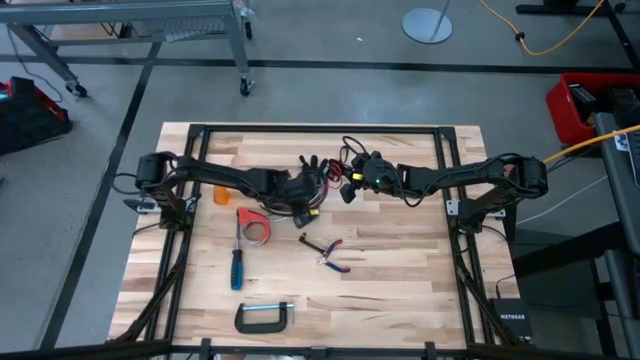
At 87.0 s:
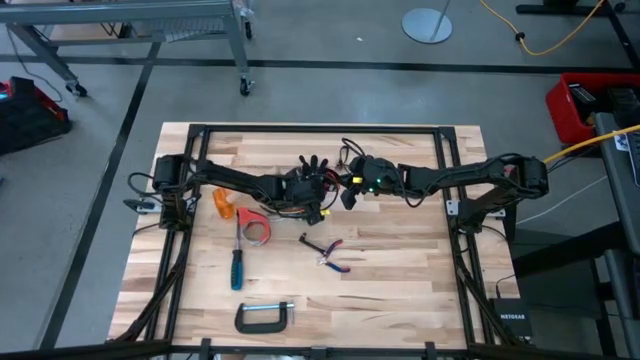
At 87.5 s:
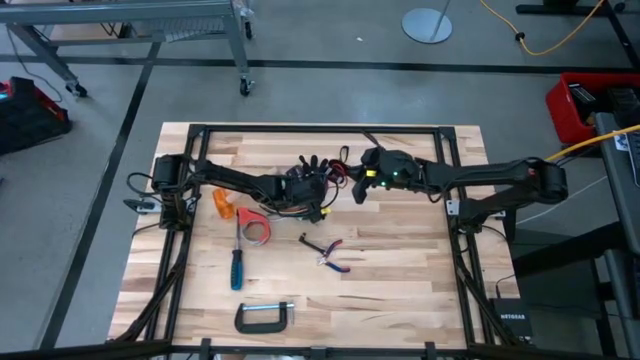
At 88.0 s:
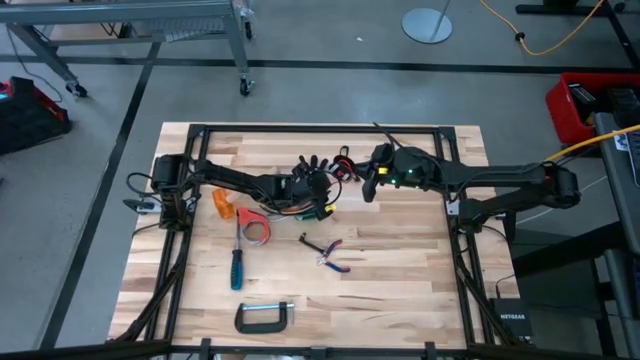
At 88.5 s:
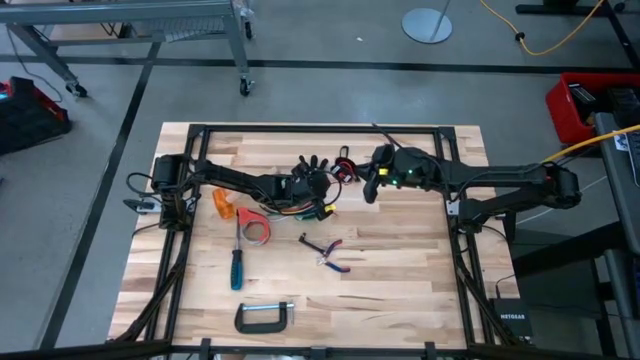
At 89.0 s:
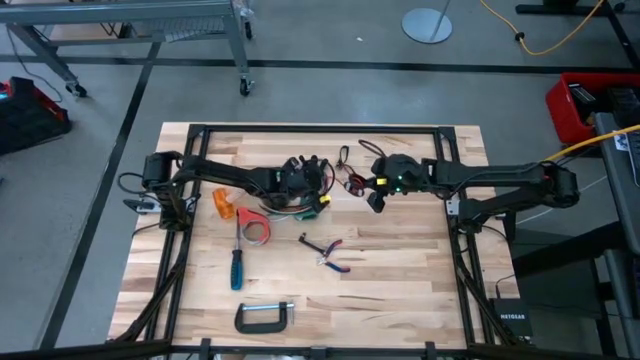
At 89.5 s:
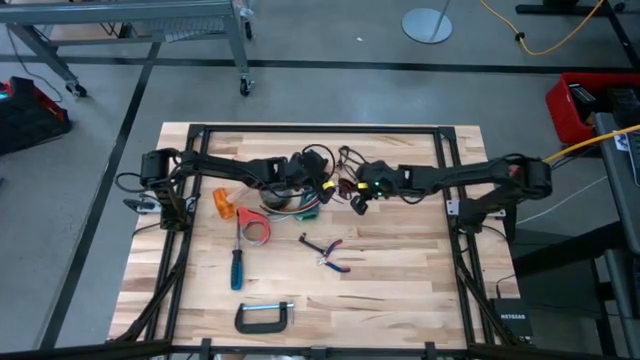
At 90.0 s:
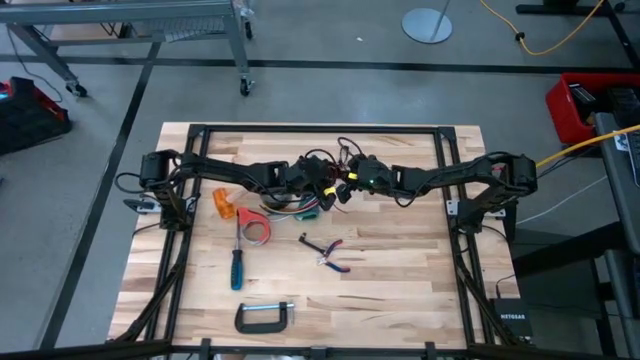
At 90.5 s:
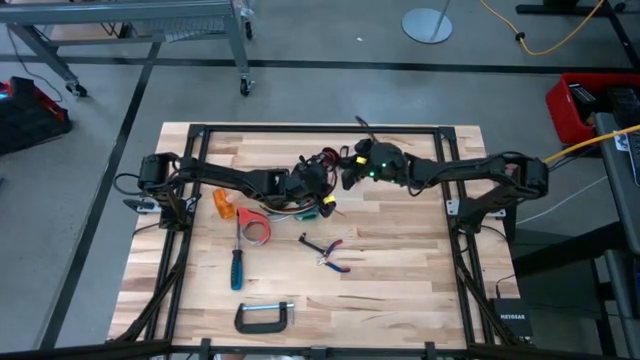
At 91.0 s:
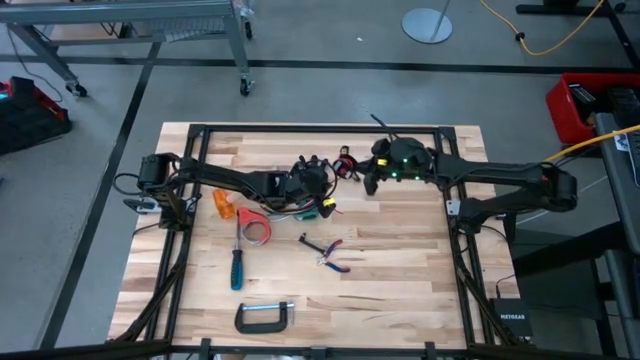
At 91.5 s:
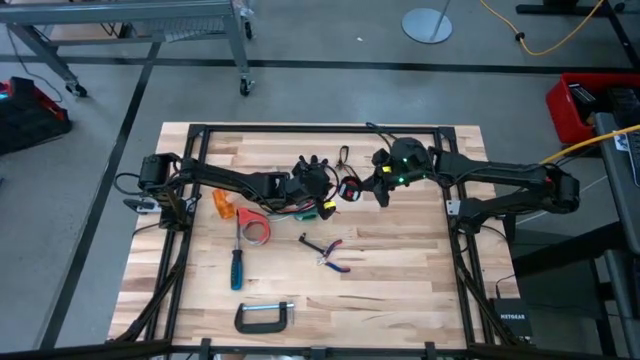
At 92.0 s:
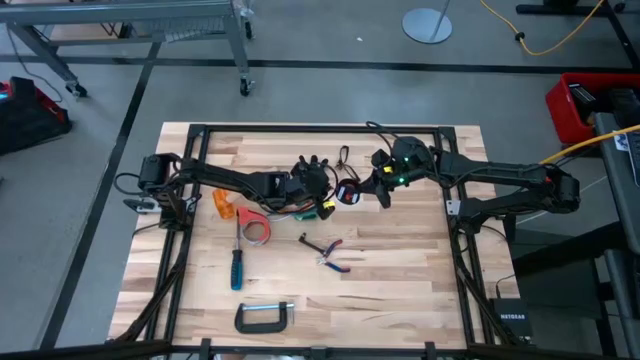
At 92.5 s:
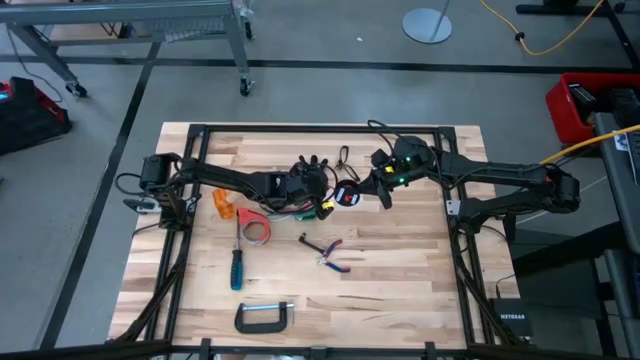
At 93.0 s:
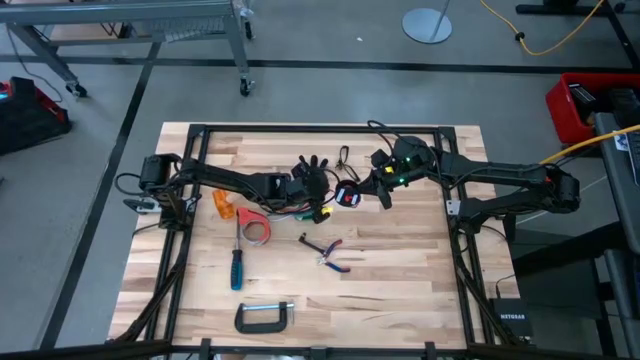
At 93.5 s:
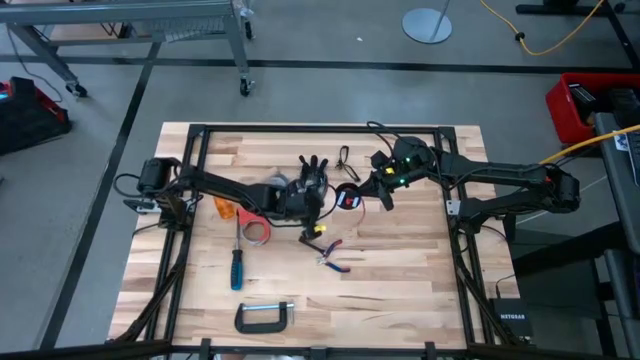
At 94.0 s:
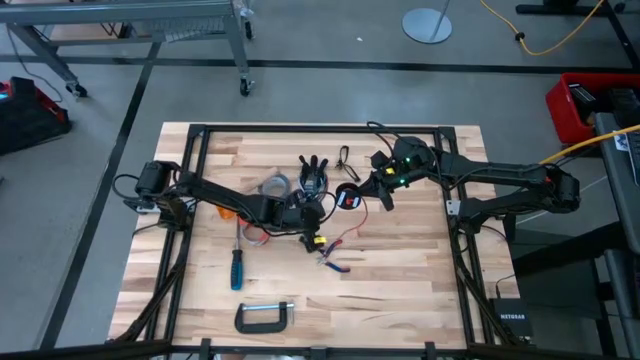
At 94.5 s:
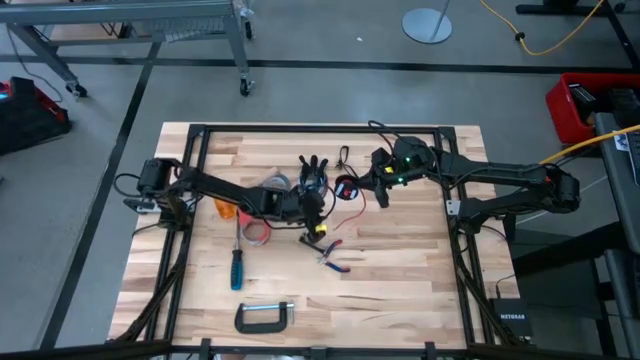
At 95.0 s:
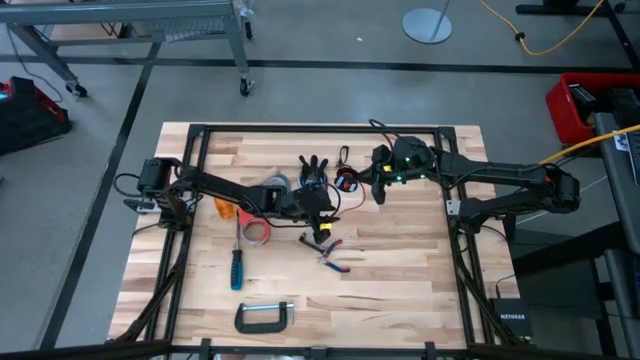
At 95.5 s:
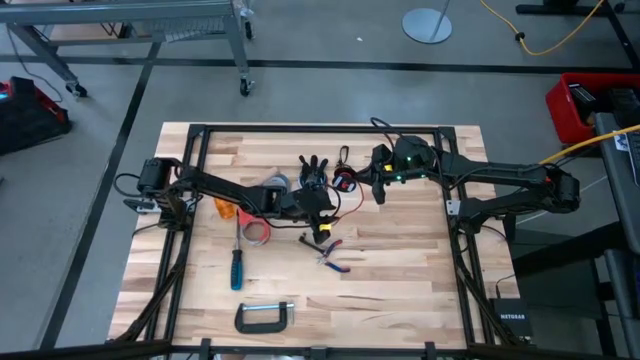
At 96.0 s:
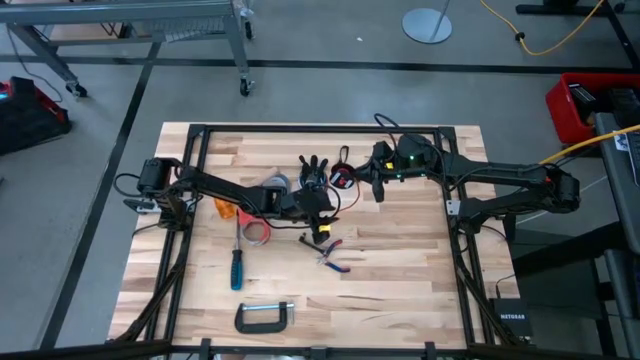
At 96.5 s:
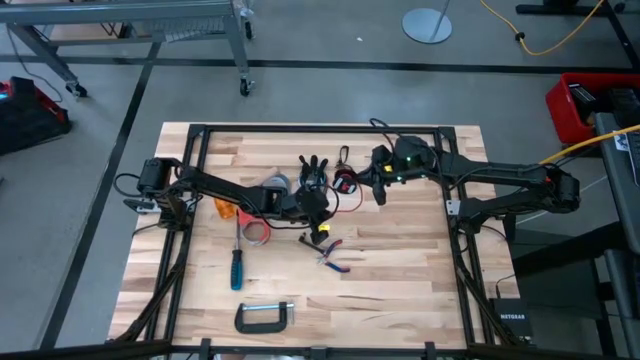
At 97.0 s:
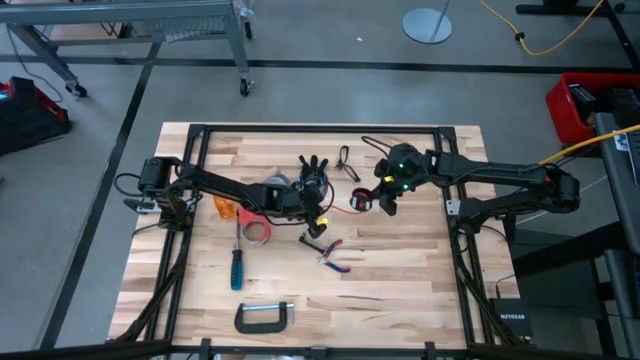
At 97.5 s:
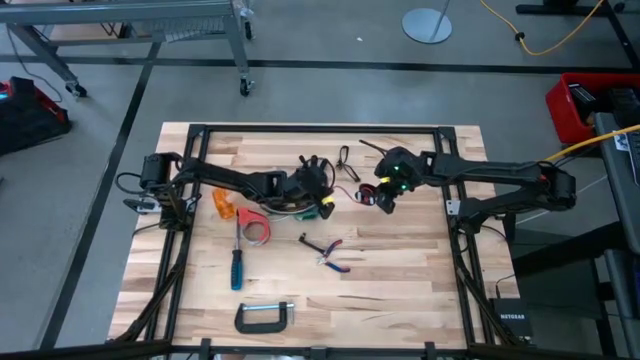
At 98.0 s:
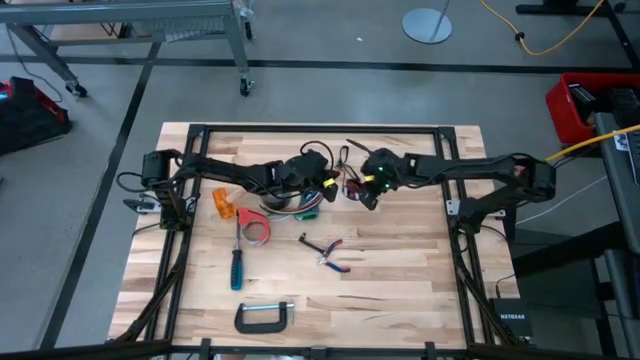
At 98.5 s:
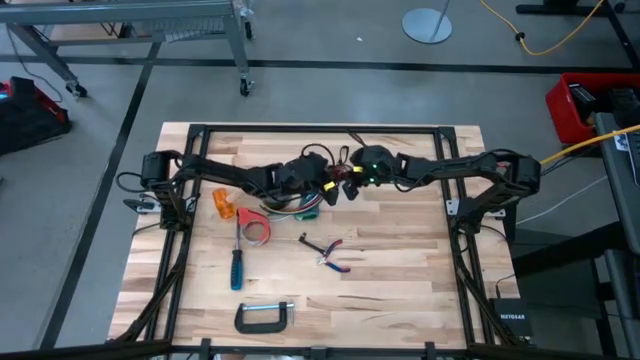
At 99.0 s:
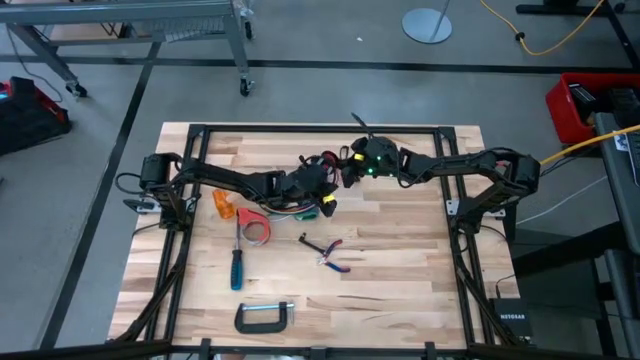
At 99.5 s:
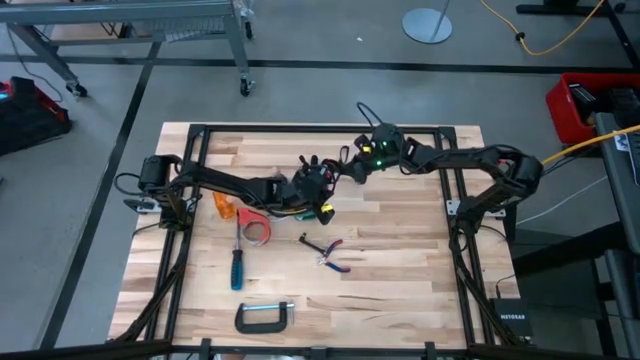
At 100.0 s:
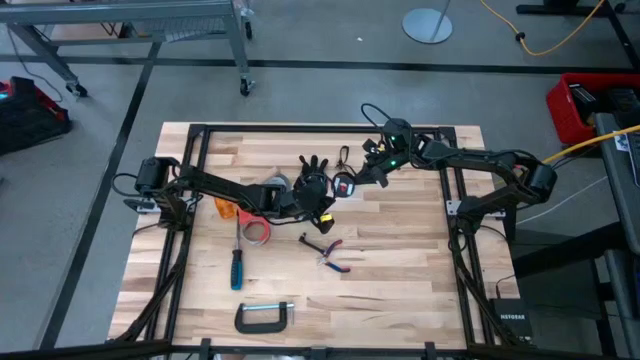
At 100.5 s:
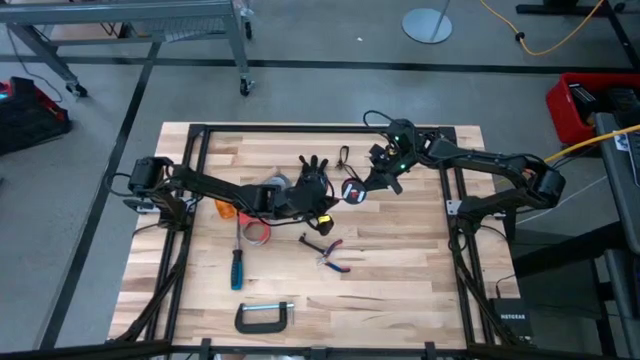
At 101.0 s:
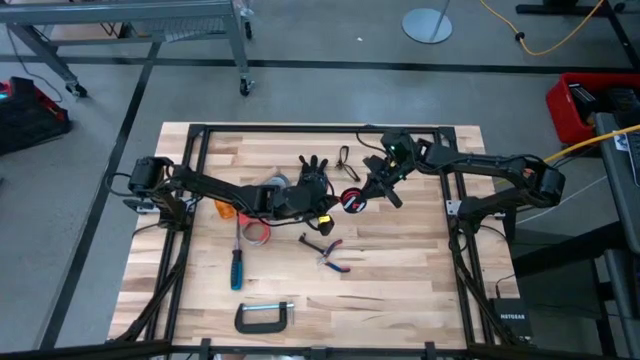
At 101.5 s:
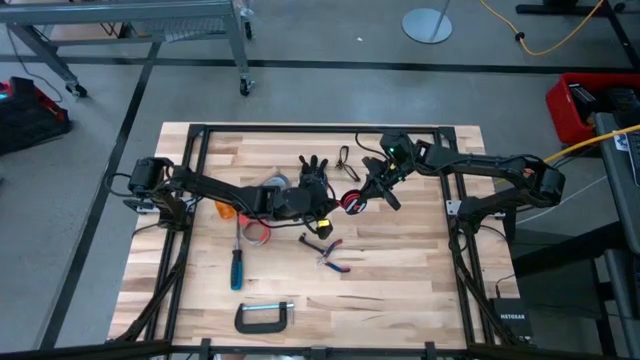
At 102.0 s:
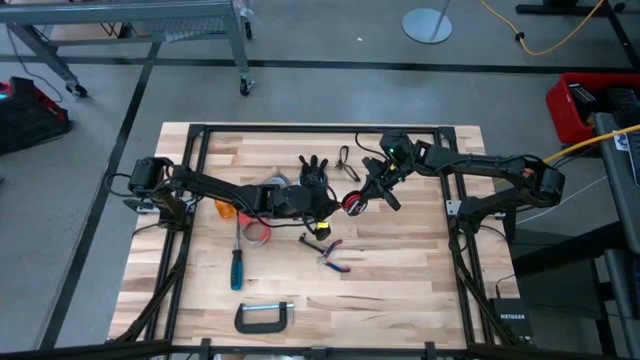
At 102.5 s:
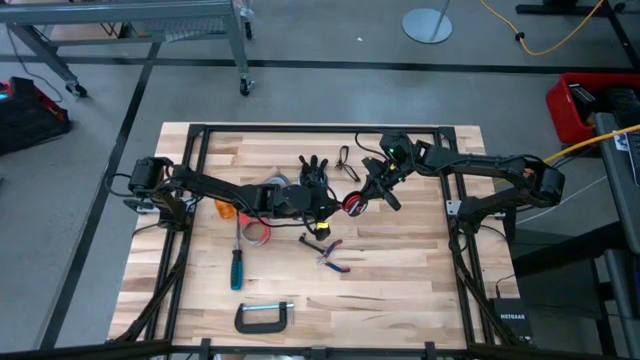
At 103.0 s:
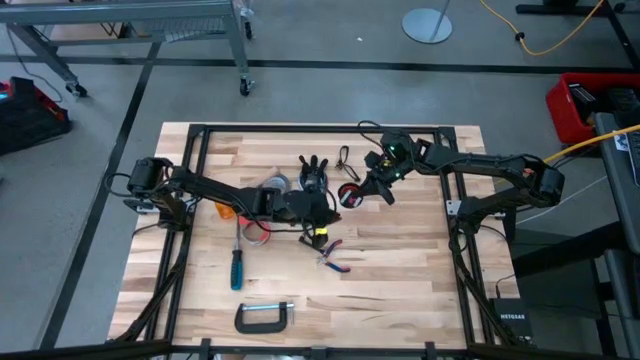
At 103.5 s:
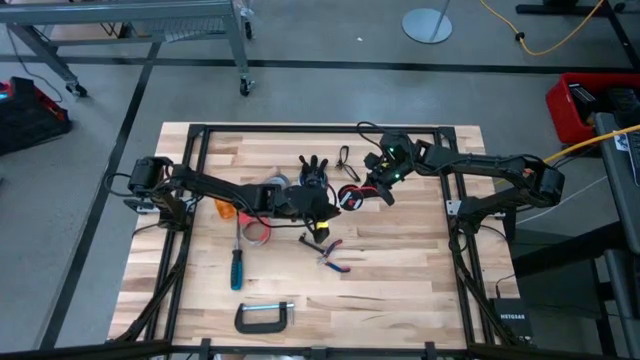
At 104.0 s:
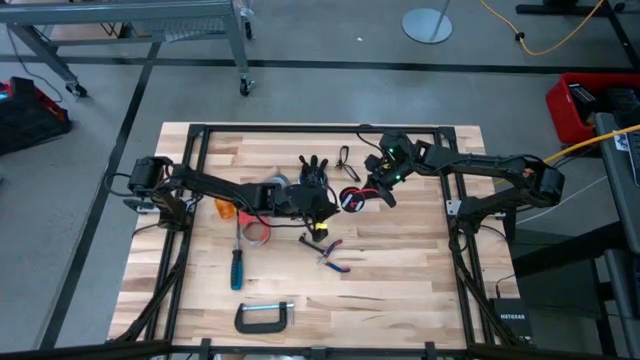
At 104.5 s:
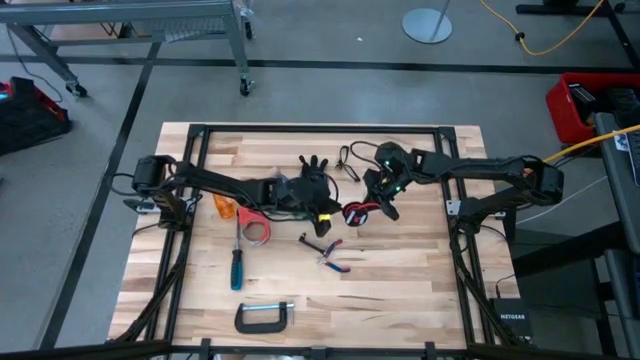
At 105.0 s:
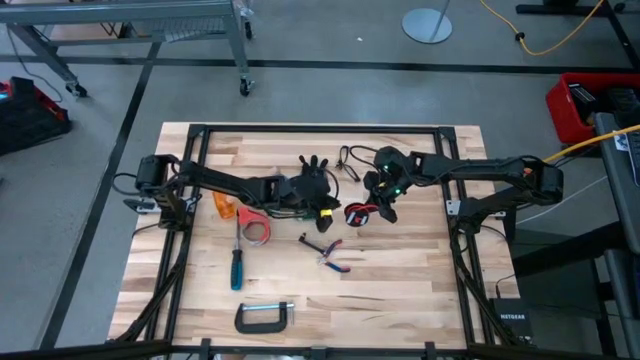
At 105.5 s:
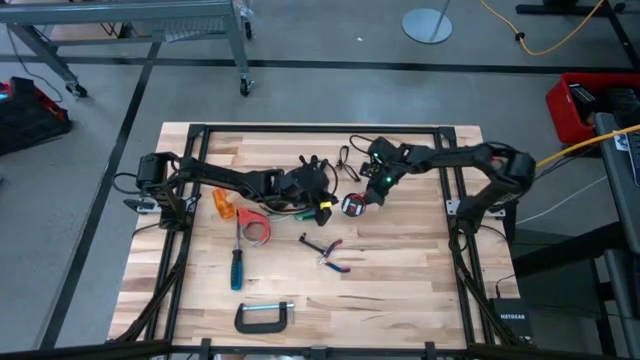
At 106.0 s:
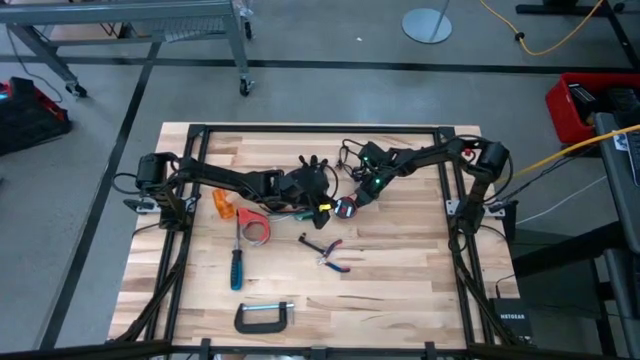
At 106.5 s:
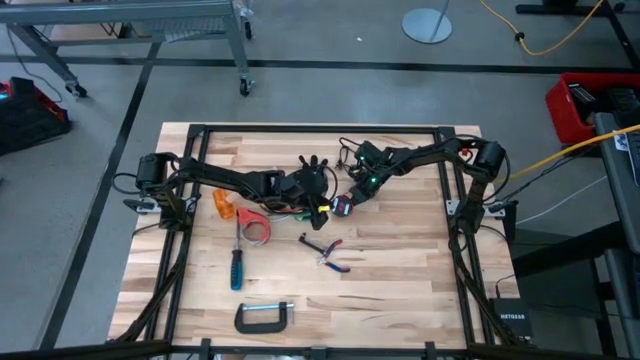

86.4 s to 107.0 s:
Task: Coil cords
Coil the red wire onto the black spool

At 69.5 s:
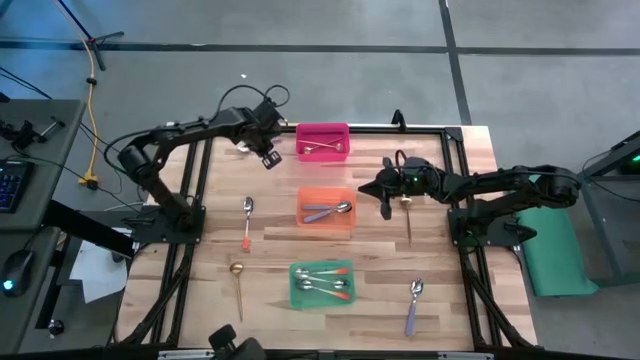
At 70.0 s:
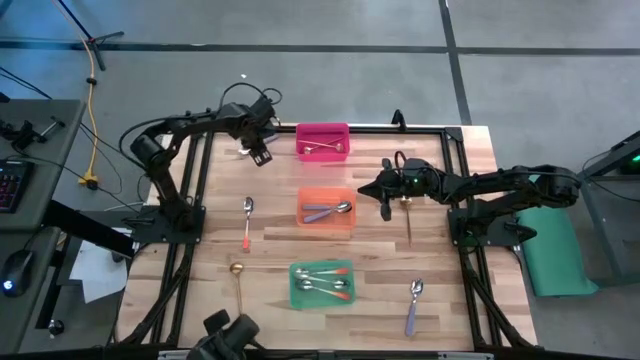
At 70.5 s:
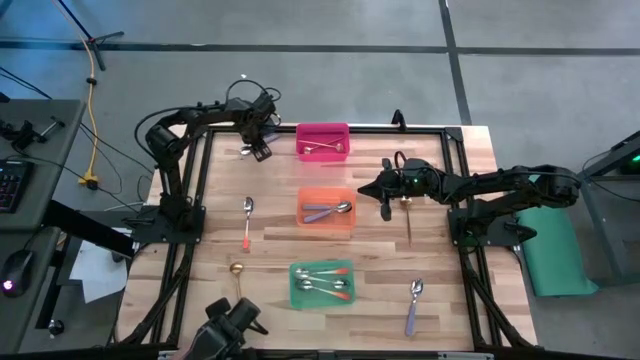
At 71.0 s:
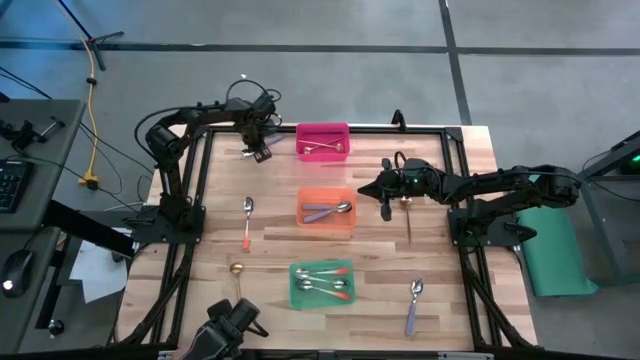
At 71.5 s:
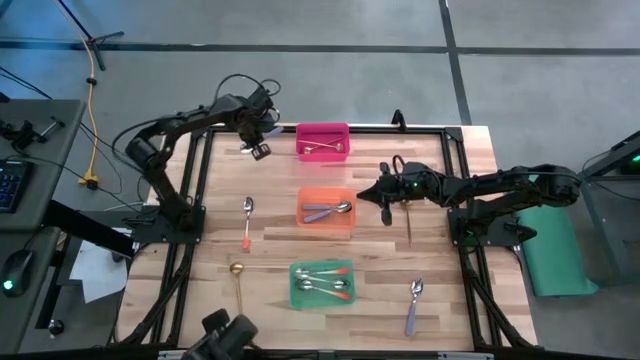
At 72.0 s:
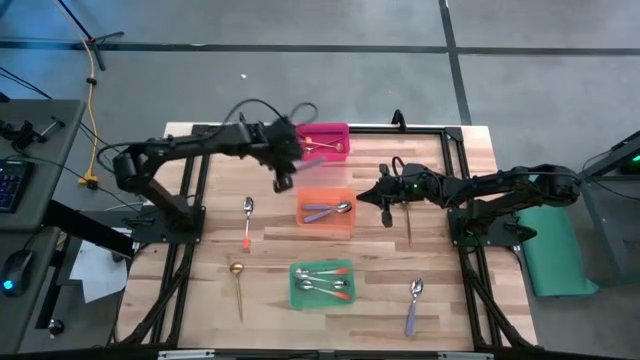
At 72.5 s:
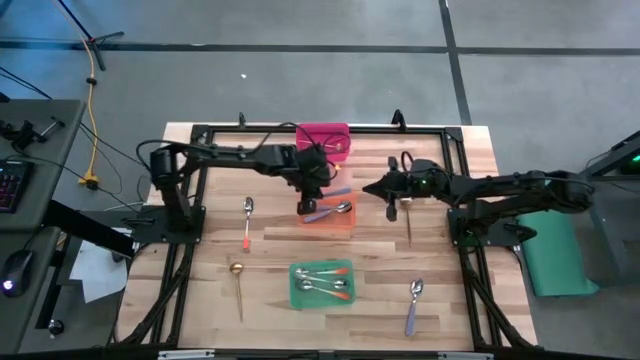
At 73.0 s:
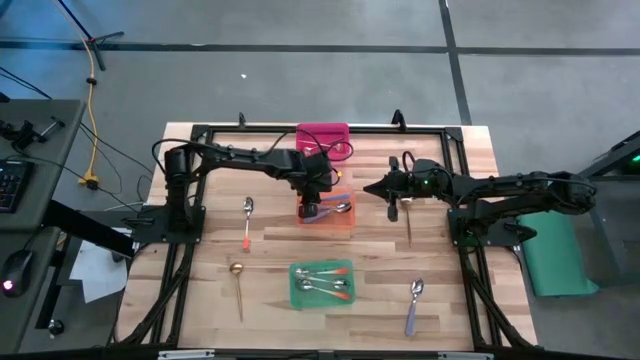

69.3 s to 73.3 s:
Task: Sort silverware by color (type)
Put the top violet spoon into the orange bin
